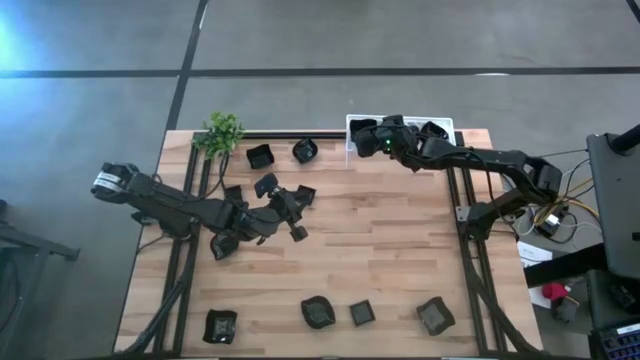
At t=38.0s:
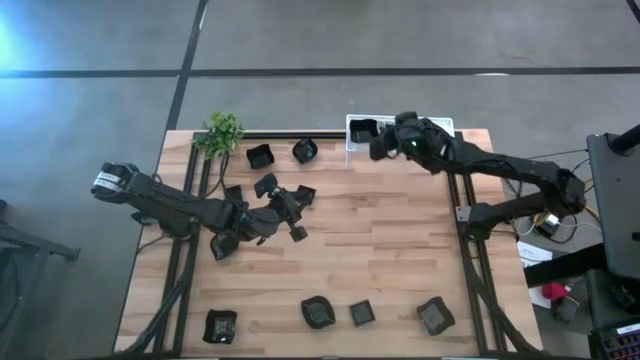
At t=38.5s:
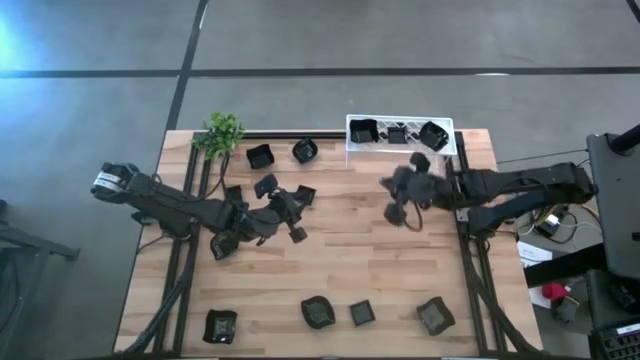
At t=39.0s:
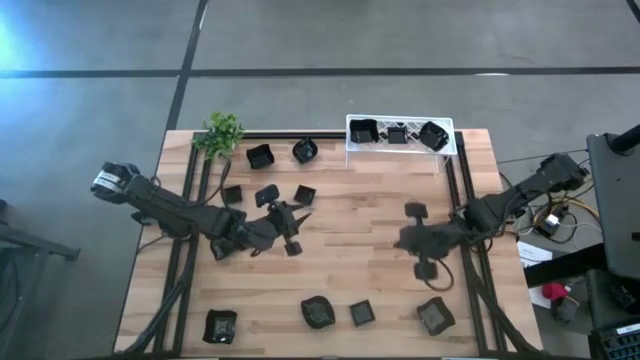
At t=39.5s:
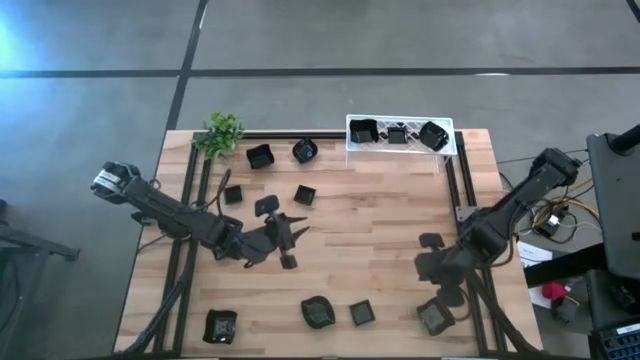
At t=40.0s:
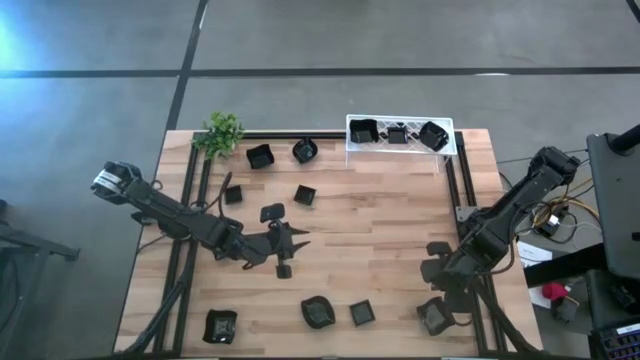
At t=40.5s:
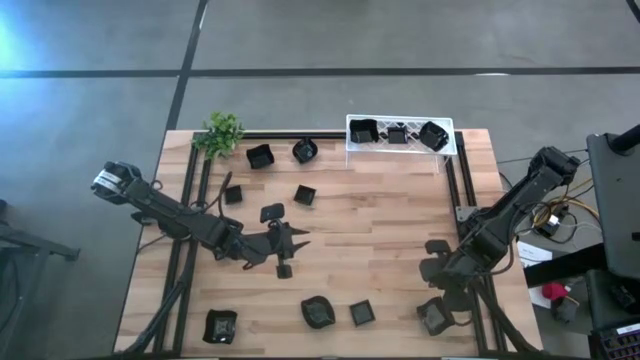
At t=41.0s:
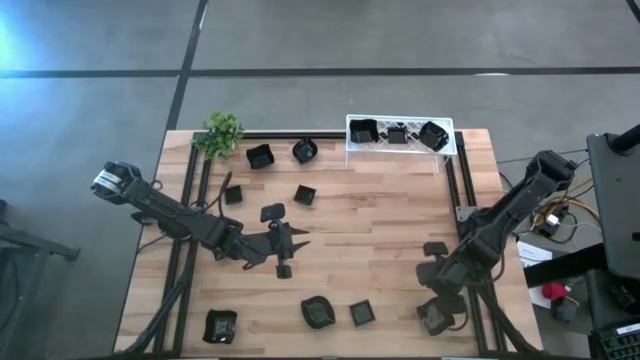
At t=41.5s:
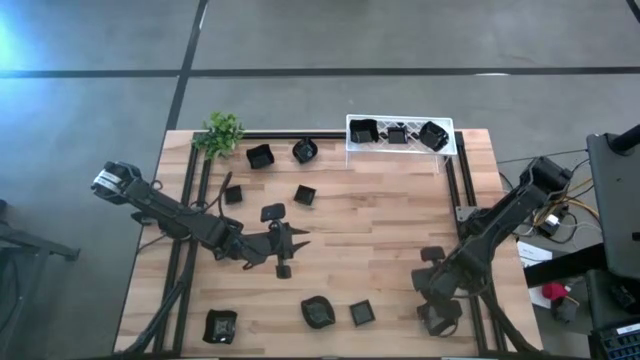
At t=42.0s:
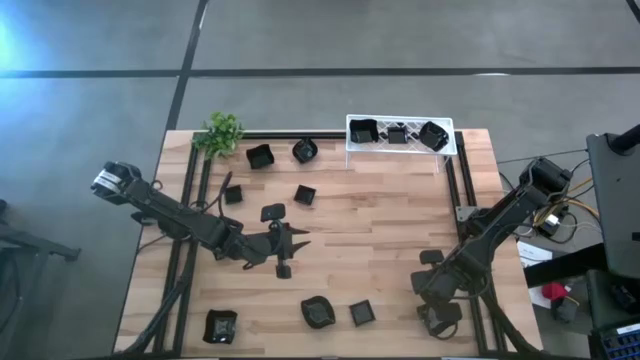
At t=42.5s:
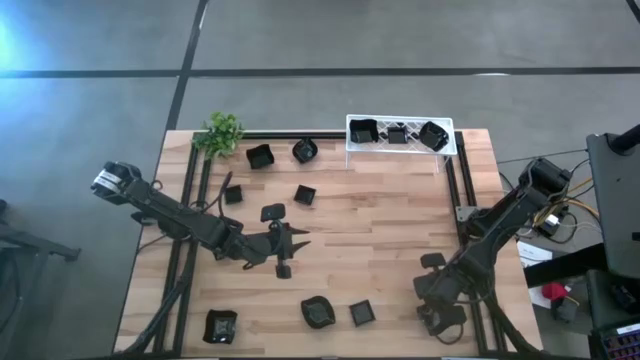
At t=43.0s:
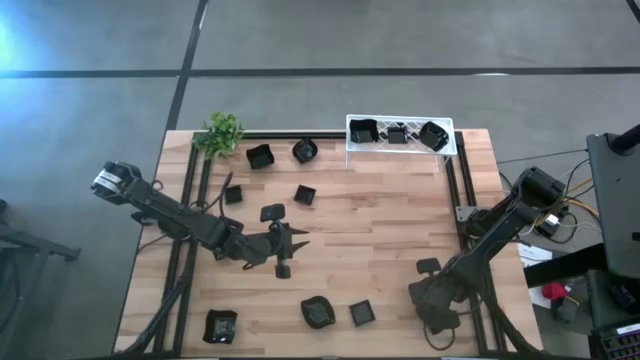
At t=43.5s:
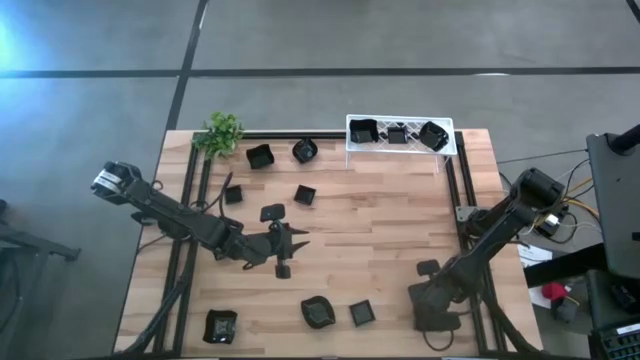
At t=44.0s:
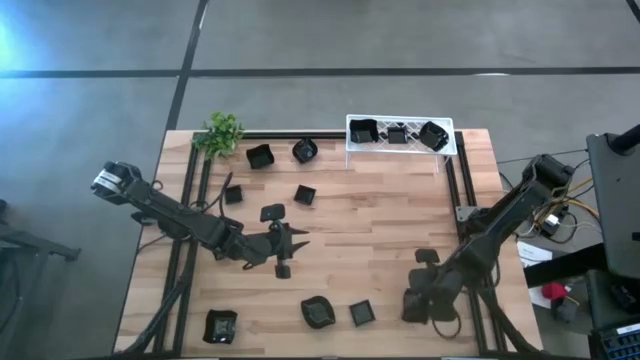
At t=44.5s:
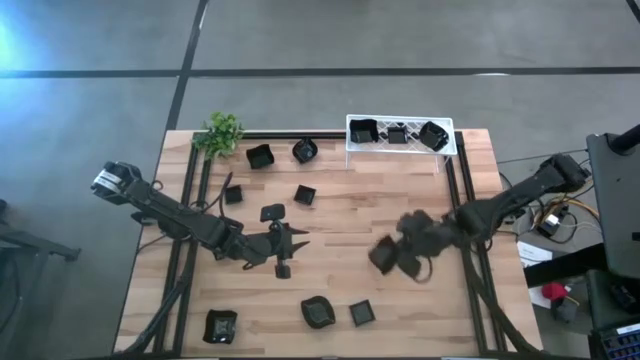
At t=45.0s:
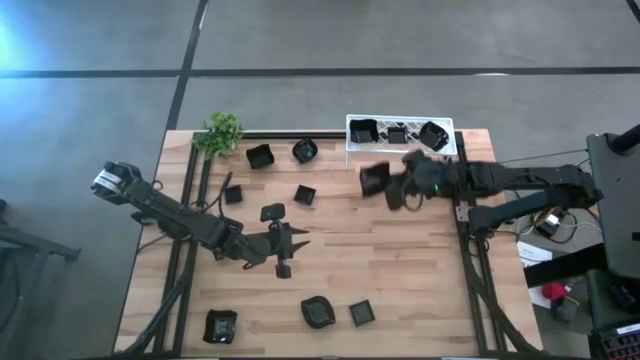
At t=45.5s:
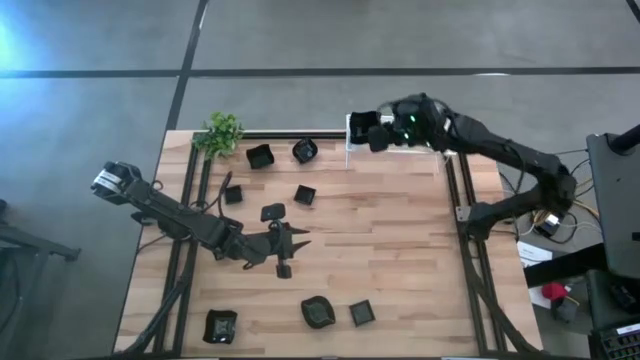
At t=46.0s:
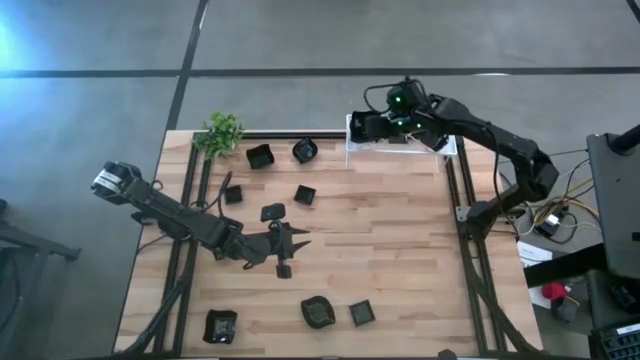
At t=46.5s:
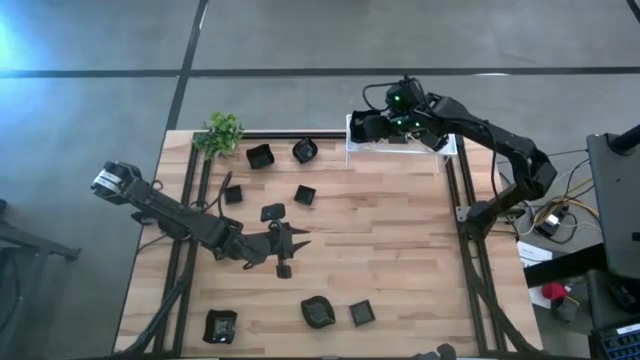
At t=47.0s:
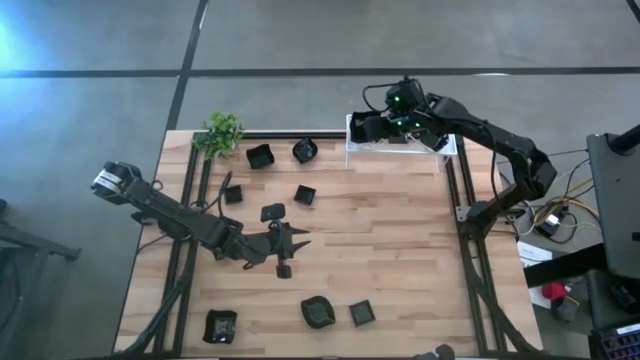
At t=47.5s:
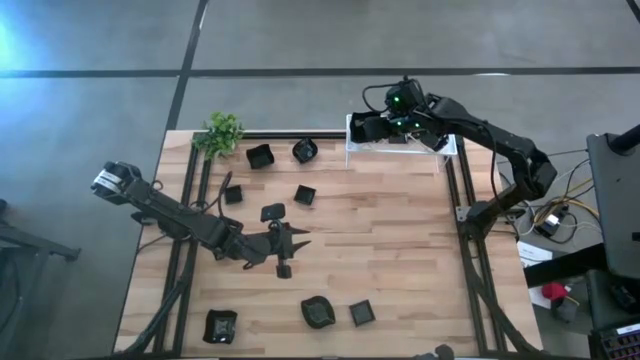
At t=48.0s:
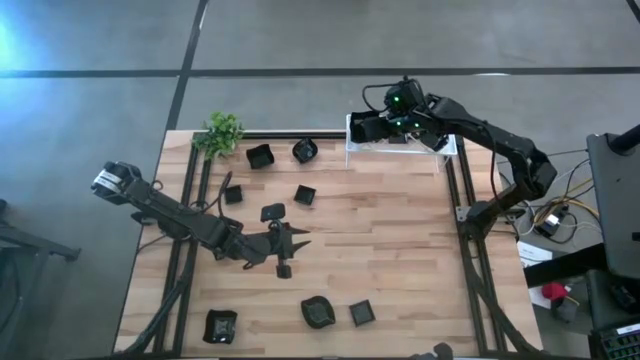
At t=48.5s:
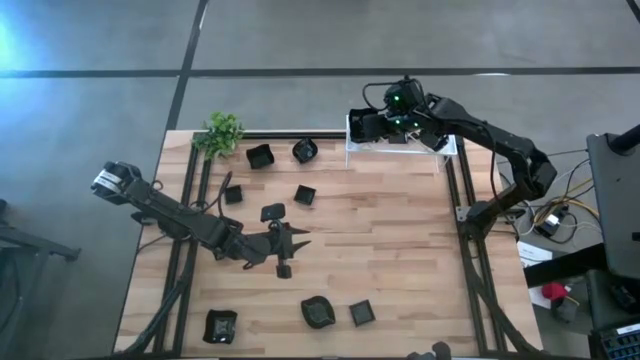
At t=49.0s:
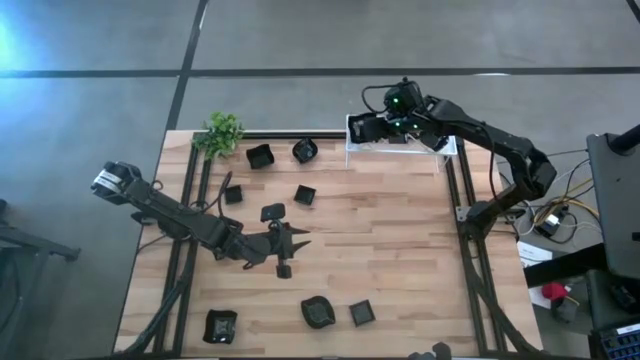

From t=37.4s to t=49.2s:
Task: Pick & Place Mini shaped plates
Stack the black distorted square plate on top of the black distorted square plate on the shelf

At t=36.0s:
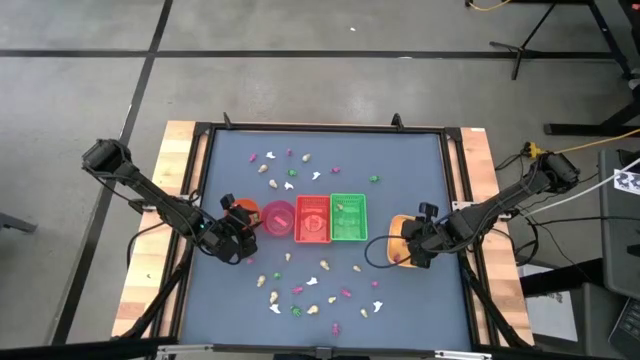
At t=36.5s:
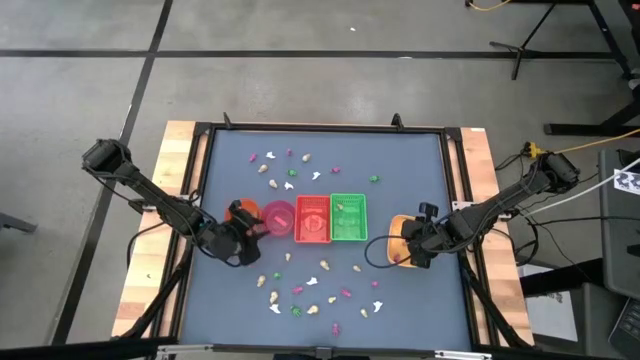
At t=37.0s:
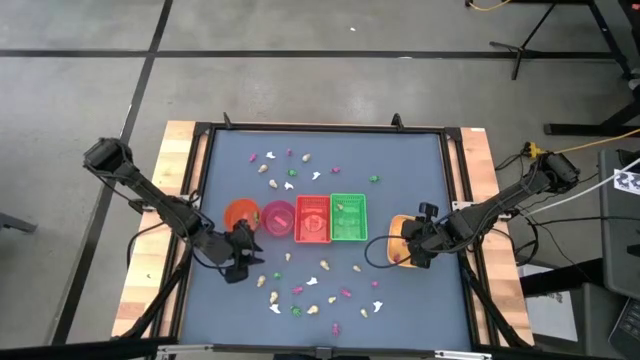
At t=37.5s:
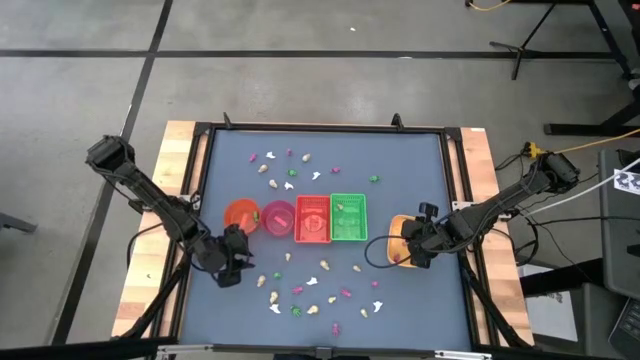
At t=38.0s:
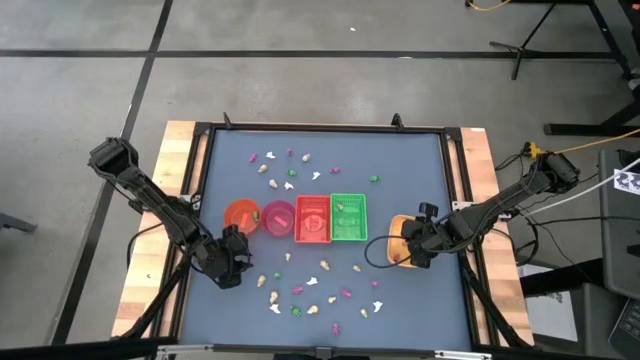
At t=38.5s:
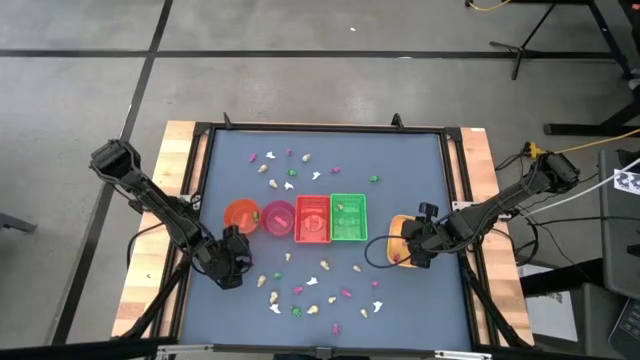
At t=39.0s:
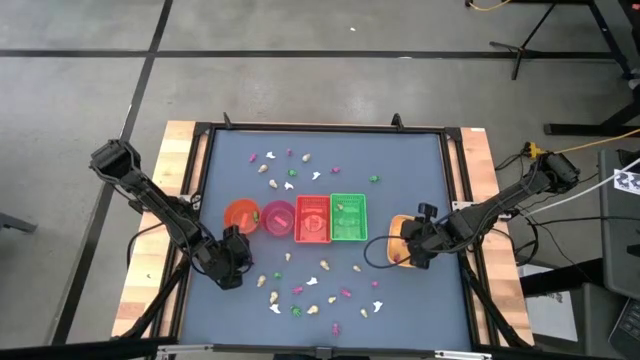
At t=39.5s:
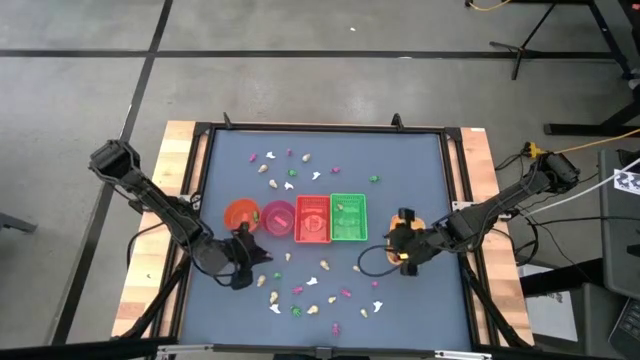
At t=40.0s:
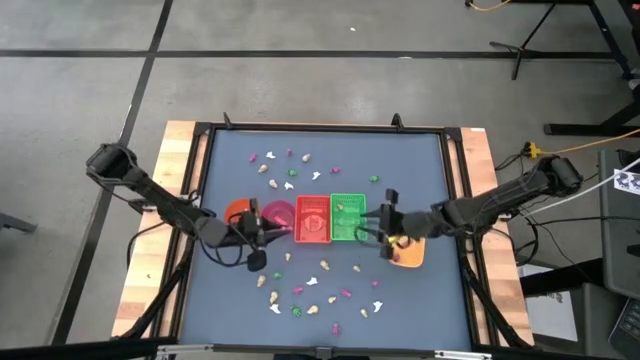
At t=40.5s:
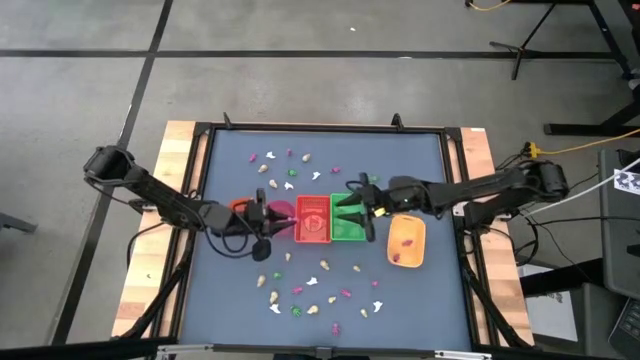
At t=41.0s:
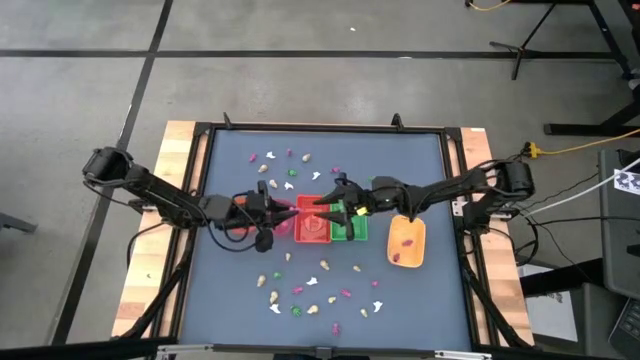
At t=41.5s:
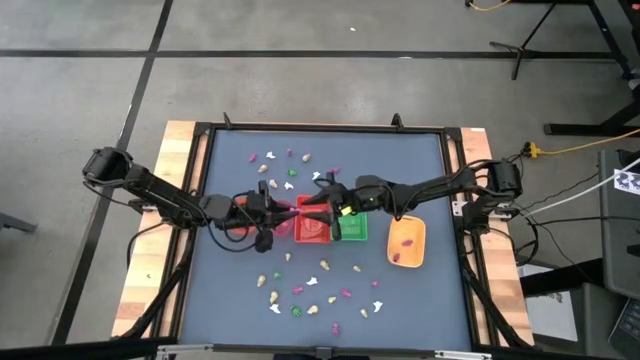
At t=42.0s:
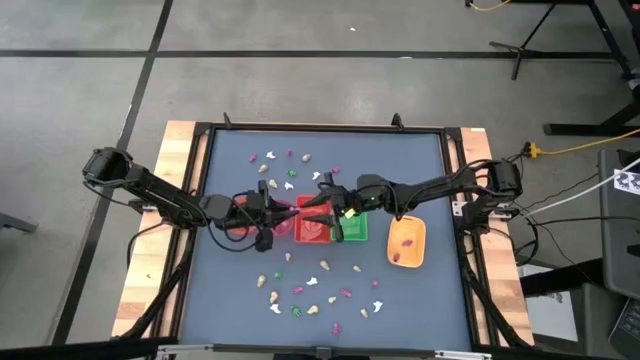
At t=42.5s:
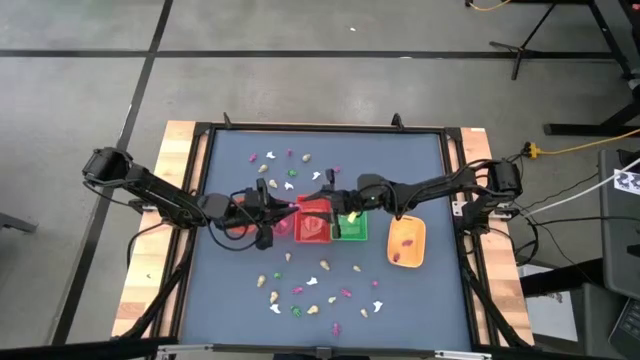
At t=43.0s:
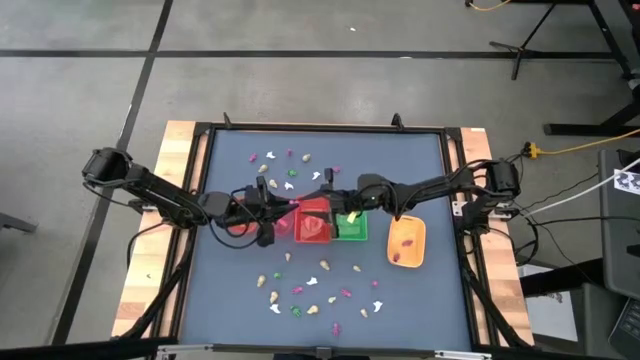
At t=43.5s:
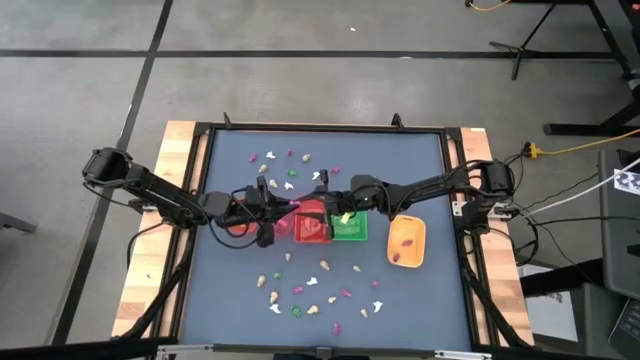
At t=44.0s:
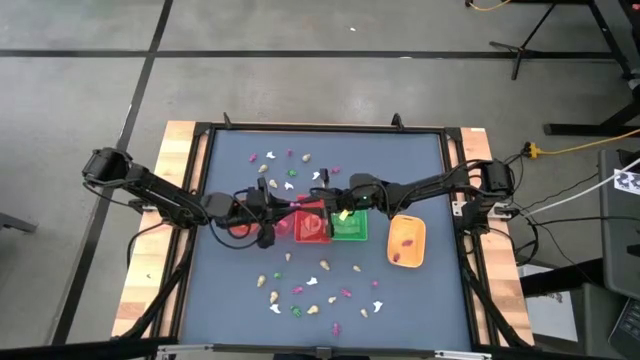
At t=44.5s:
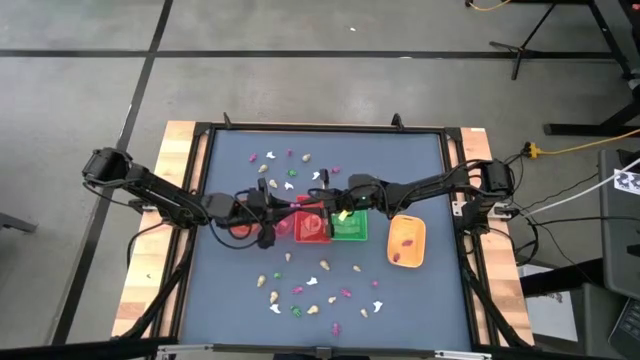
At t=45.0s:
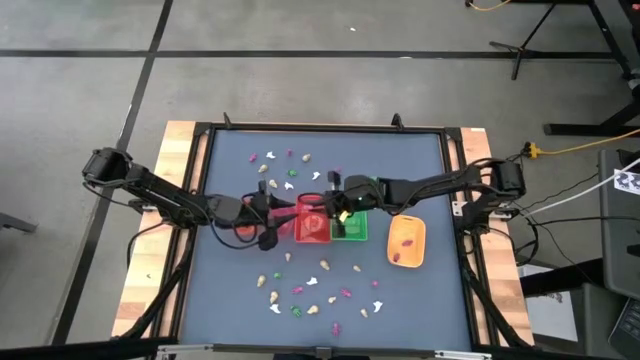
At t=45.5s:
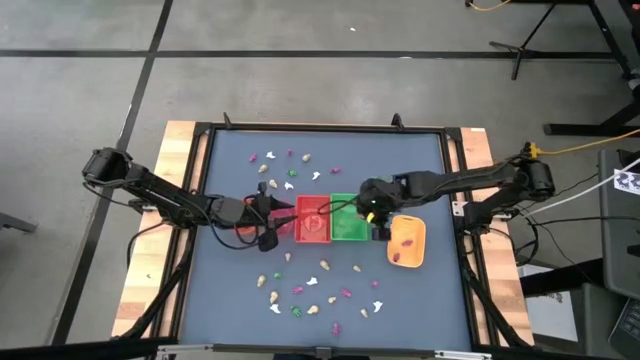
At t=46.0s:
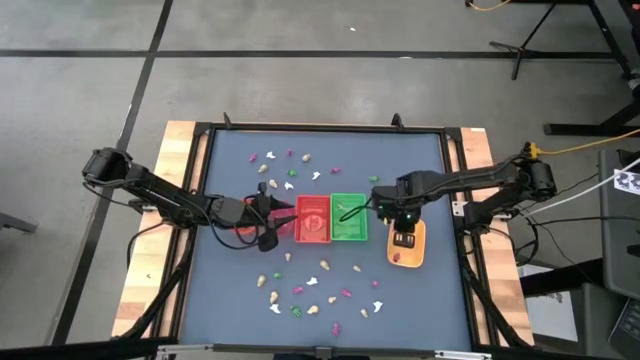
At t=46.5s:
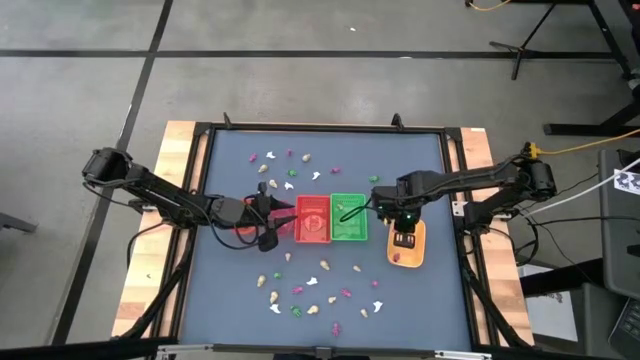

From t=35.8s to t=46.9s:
Task: Sort Halloween decoration
Put the pink skeleton toy into the yellow bin
